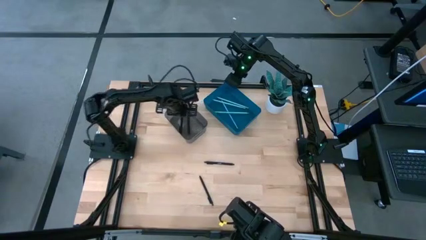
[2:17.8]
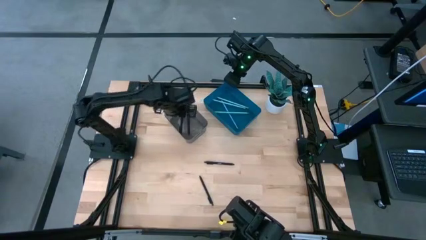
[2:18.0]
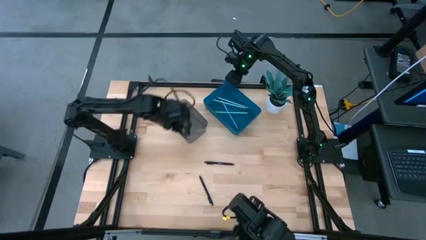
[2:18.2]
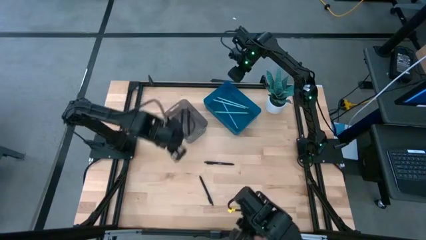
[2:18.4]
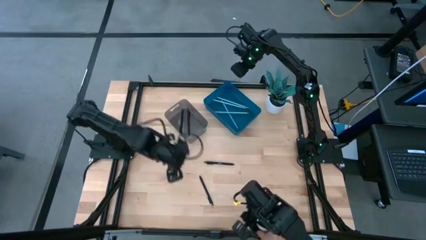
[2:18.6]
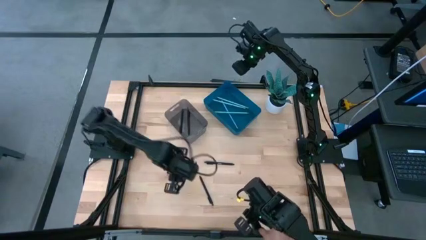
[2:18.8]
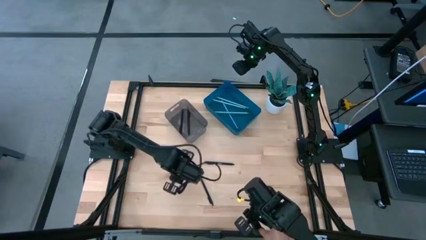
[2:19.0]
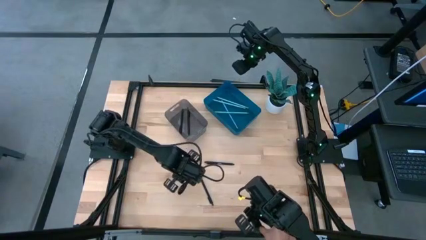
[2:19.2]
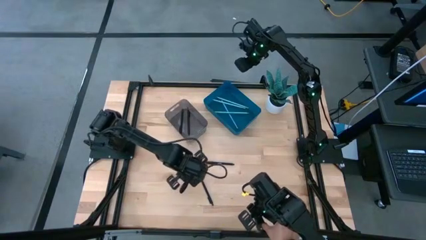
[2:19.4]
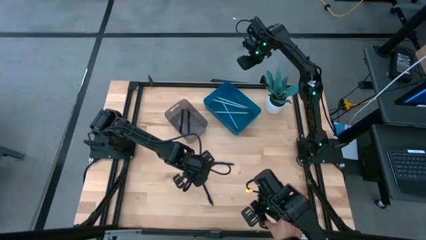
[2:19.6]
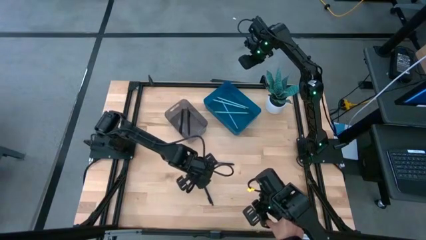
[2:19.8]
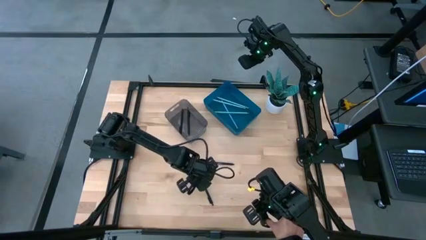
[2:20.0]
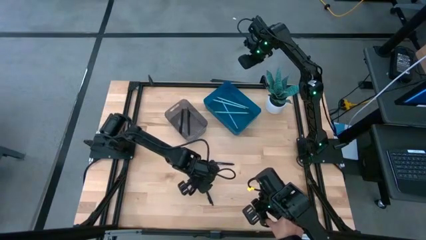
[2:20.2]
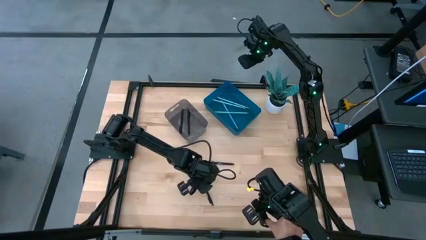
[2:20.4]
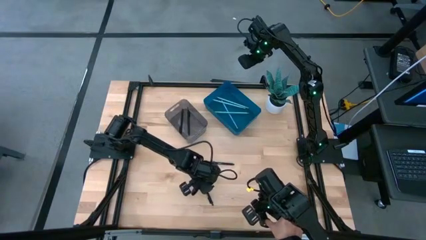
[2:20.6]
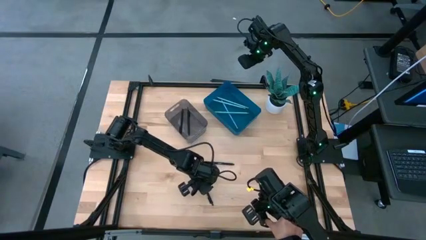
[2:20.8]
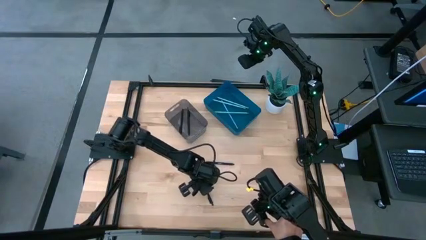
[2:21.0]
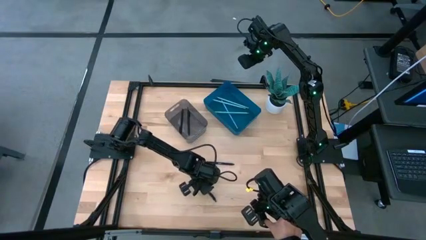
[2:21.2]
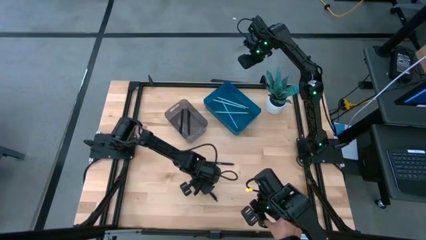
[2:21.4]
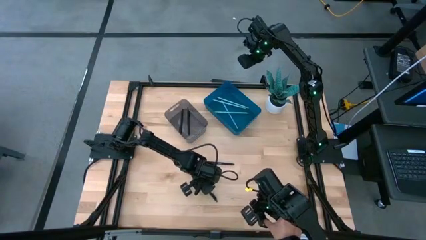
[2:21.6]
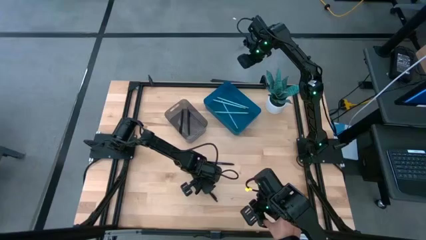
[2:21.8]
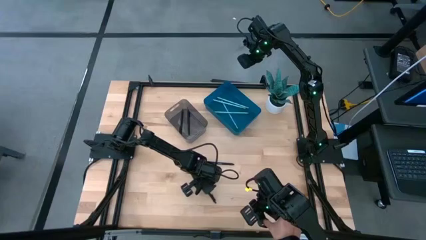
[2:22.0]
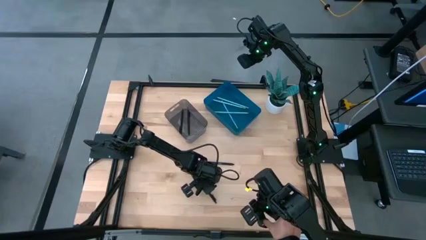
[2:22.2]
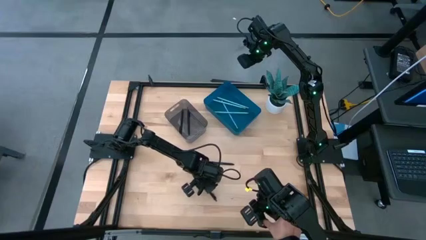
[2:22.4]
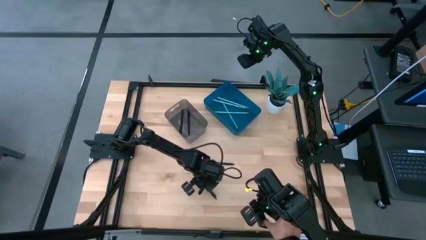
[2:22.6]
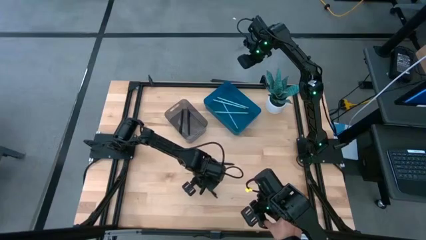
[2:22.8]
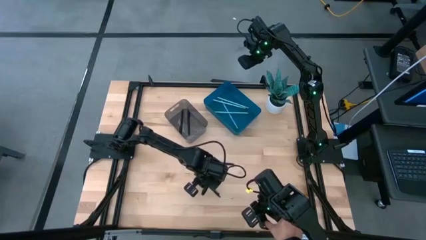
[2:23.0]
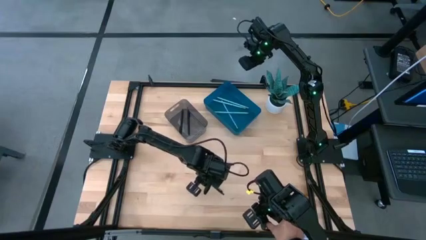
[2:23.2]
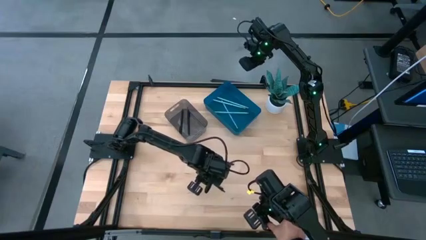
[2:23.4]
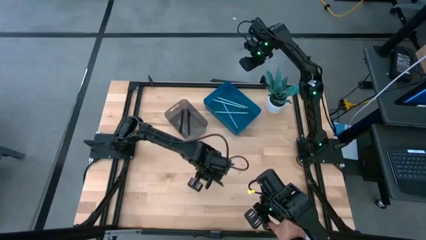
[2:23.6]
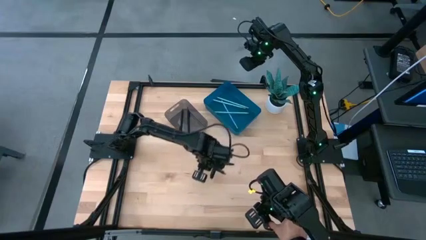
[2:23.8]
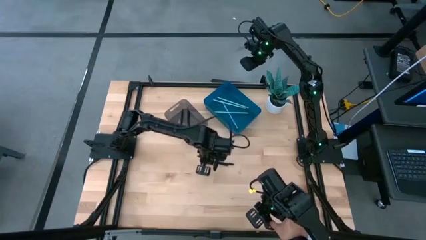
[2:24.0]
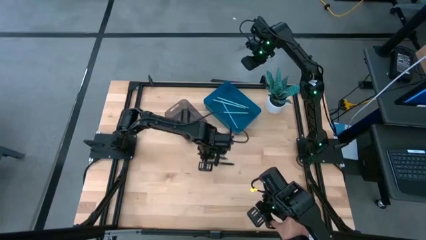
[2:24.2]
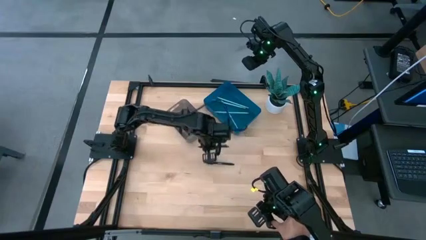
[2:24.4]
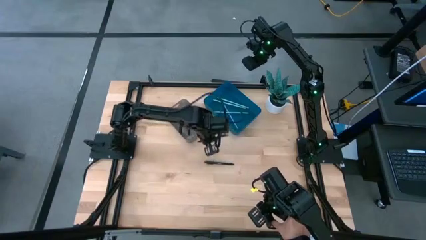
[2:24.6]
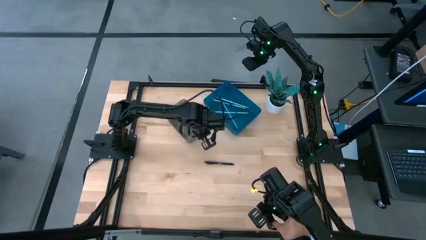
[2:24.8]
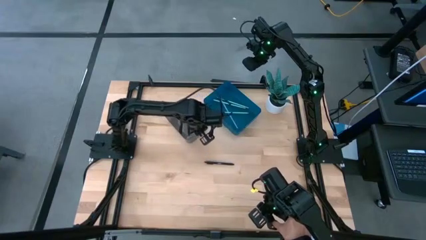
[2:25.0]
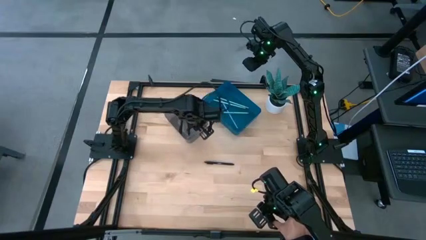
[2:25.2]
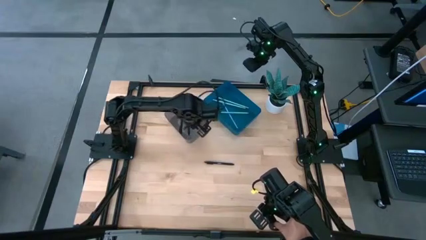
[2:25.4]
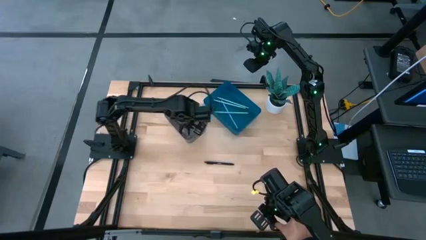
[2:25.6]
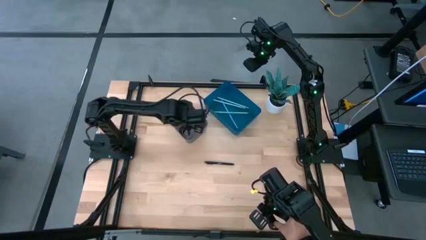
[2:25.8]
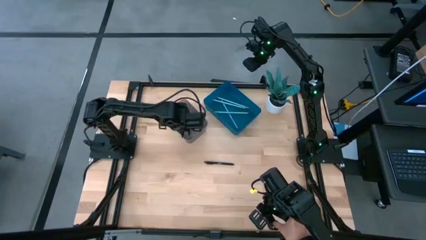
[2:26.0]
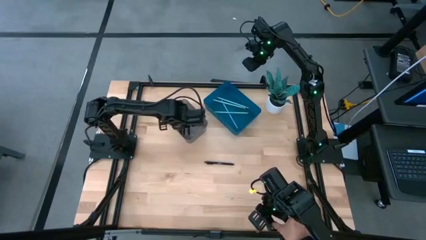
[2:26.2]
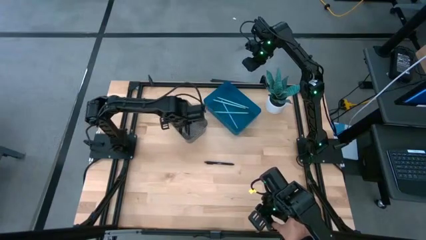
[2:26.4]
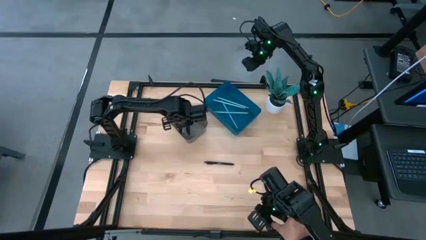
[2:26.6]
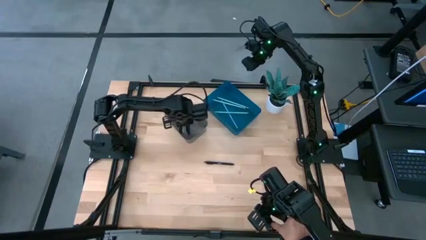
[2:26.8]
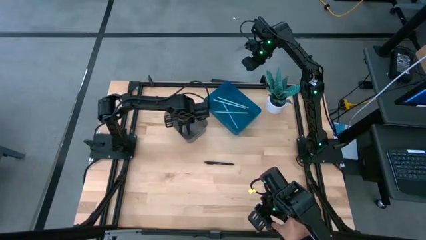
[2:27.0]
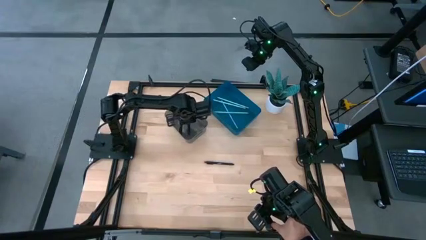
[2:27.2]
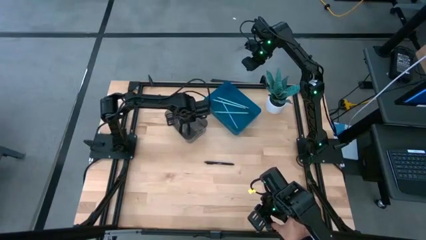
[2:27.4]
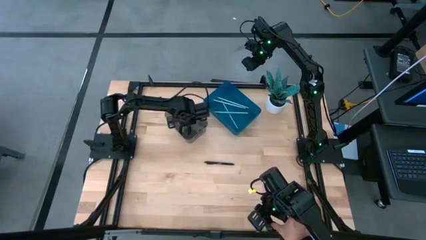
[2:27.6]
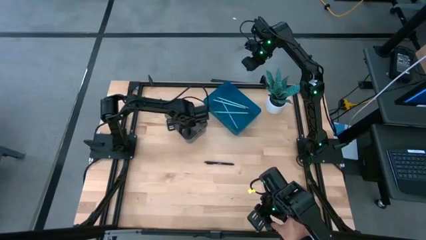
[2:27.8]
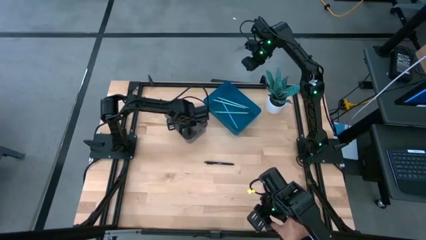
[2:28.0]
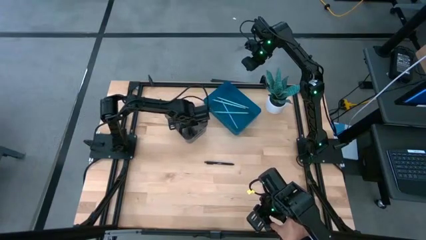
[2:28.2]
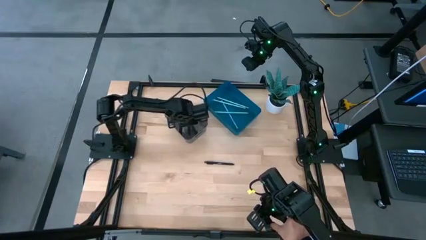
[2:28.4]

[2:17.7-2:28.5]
Task: Sort pens & pencils
Put the black pen into the black bin

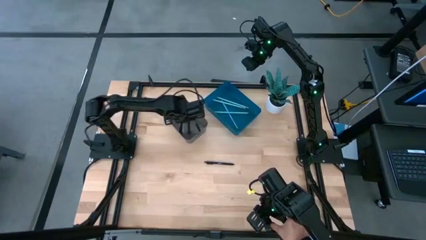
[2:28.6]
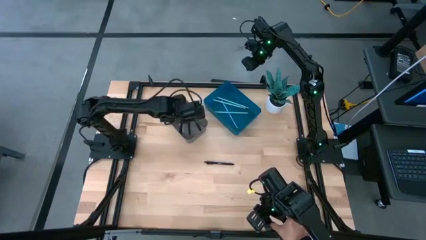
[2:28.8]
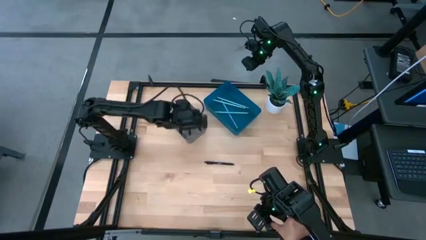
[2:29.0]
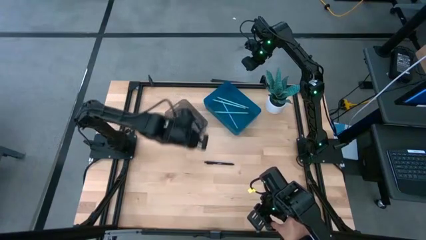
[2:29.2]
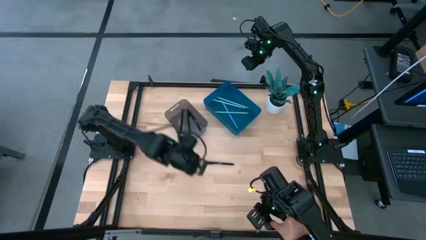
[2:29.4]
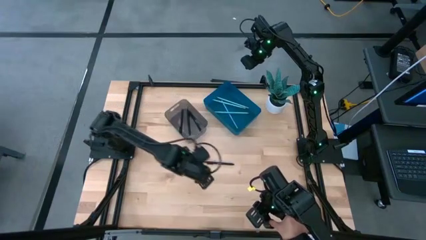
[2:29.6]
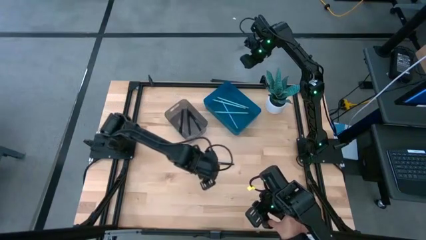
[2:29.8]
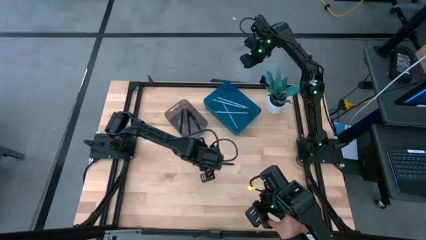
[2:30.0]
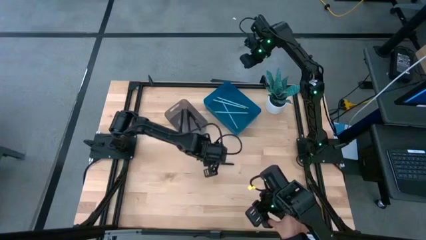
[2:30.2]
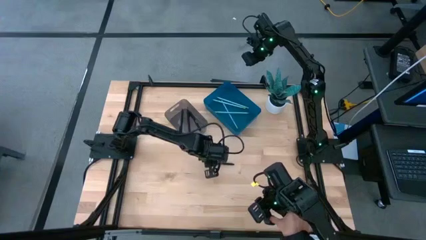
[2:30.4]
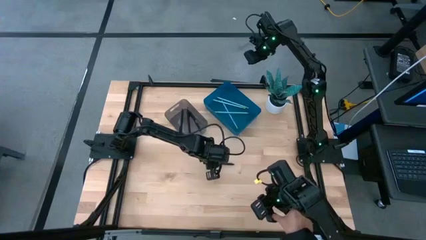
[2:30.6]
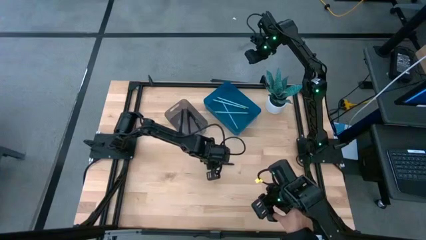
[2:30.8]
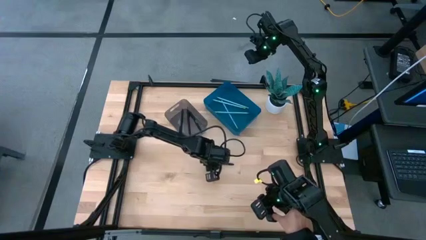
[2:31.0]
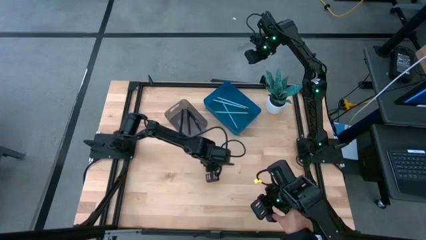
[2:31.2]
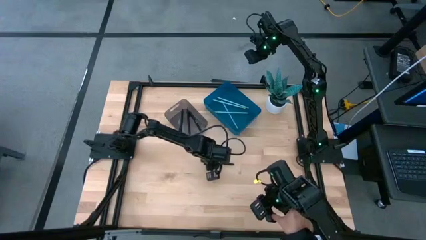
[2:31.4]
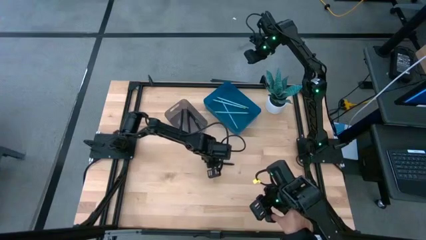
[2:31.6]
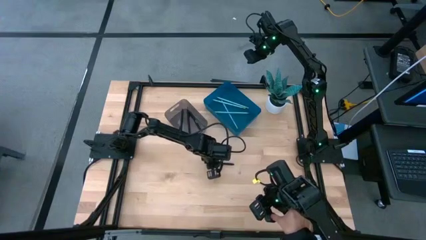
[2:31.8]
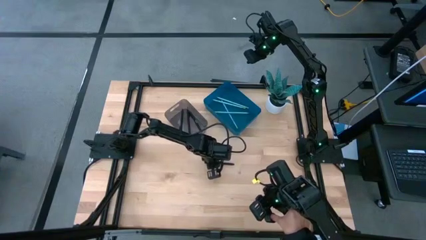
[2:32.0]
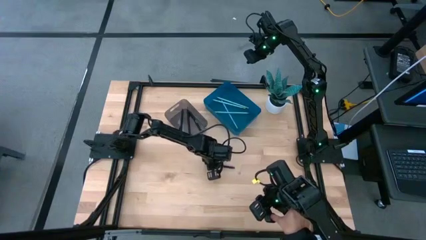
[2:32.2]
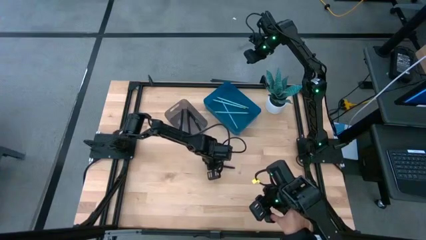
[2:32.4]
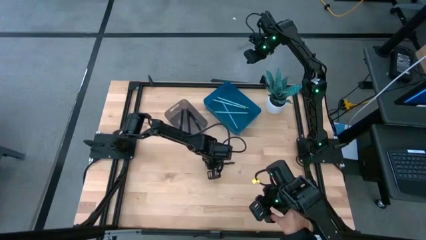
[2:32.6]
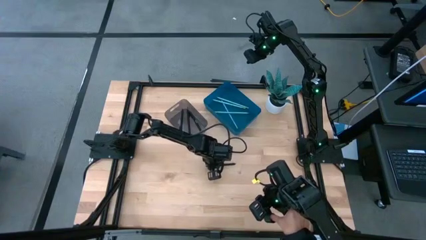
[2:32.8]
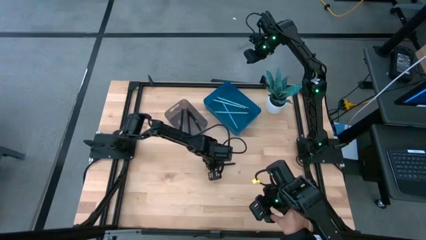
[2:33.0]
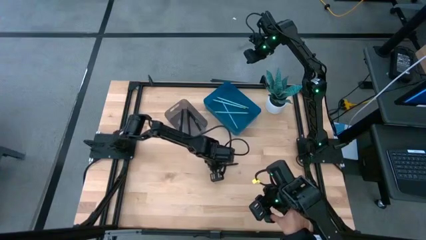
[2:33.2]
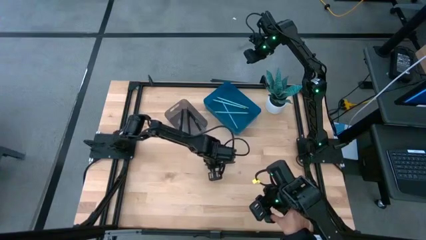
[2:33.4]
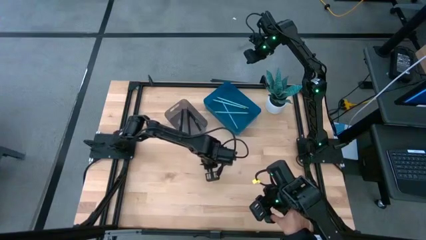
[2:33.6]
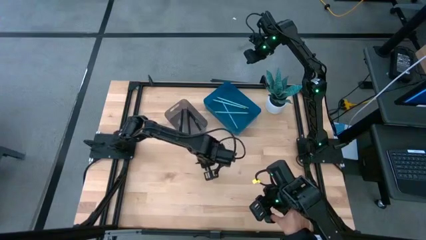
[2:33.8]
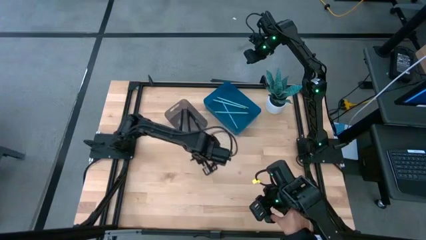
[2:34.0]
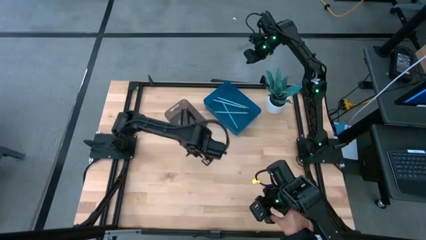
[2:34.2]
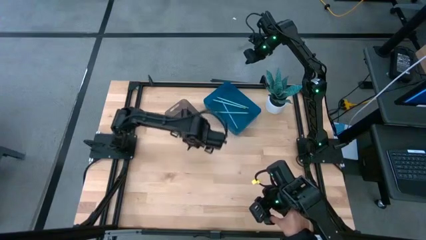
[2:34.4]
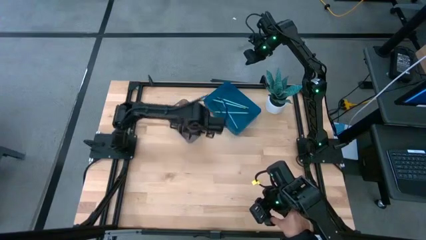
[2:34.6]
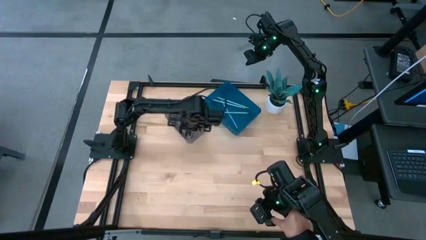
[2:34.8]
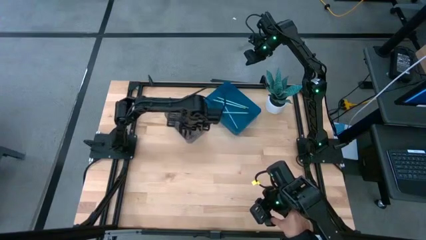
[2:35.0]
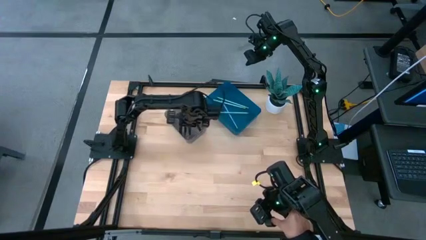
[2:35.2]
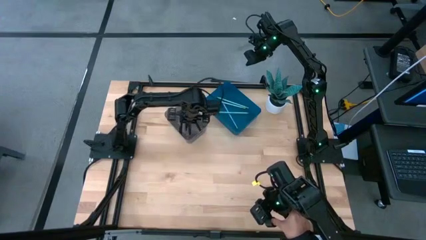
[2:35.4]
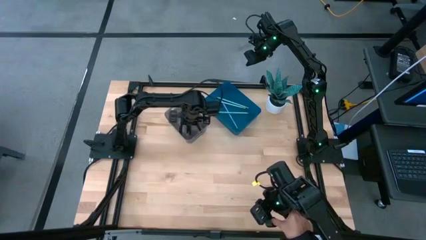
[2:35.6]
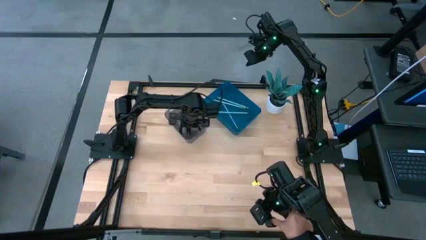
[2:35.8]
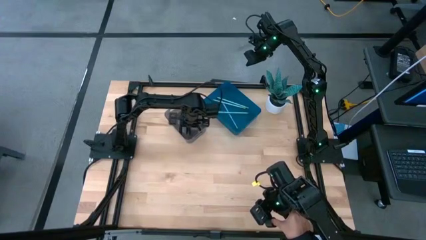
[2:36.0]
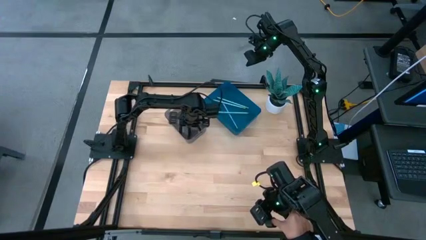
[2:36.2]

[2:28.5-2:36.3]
Put the black pen into the black bin
